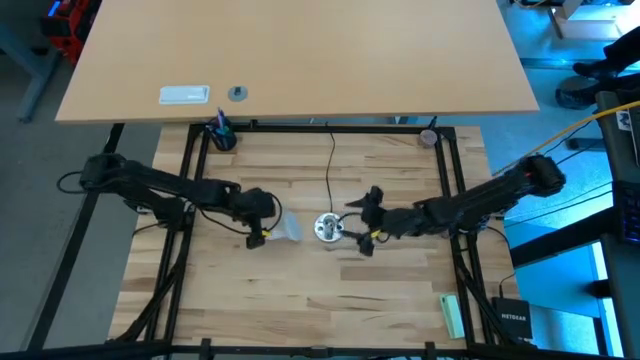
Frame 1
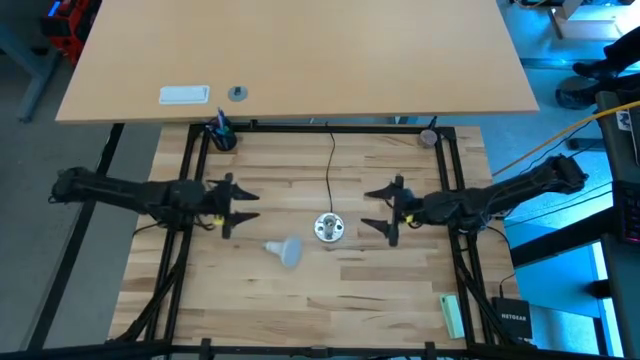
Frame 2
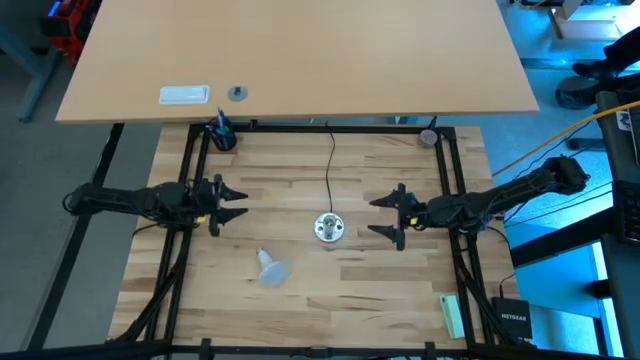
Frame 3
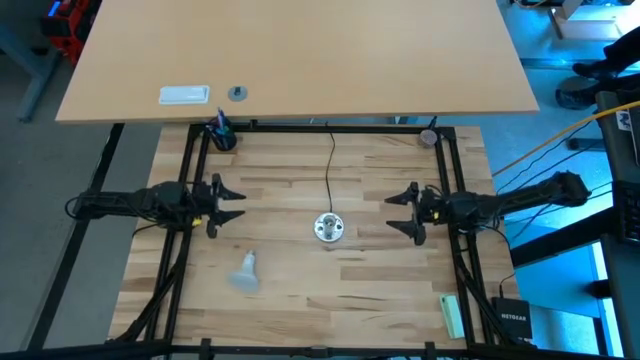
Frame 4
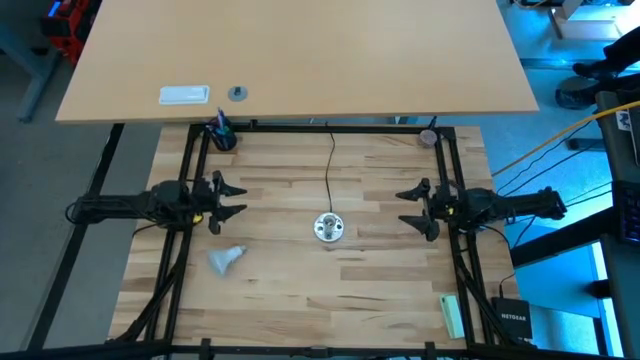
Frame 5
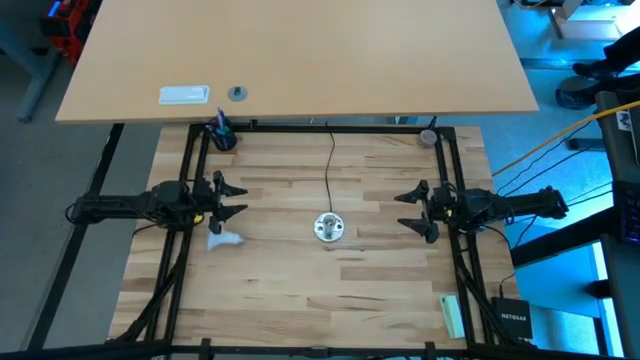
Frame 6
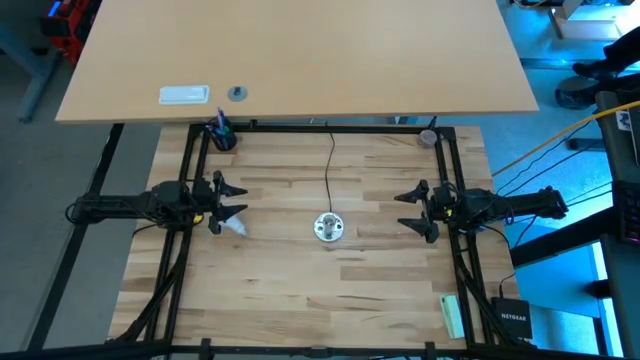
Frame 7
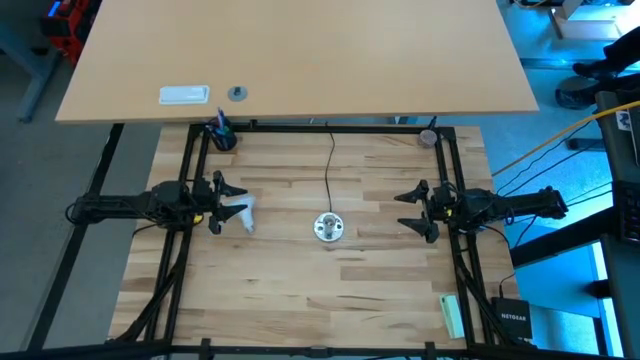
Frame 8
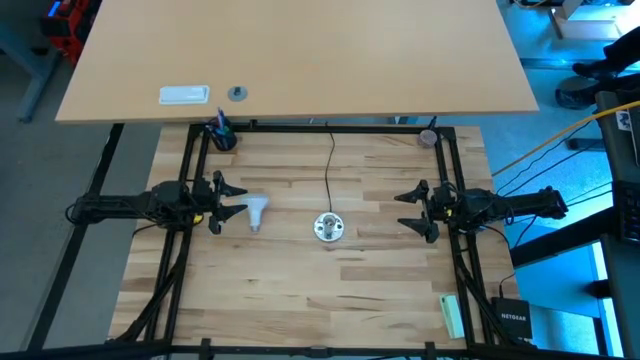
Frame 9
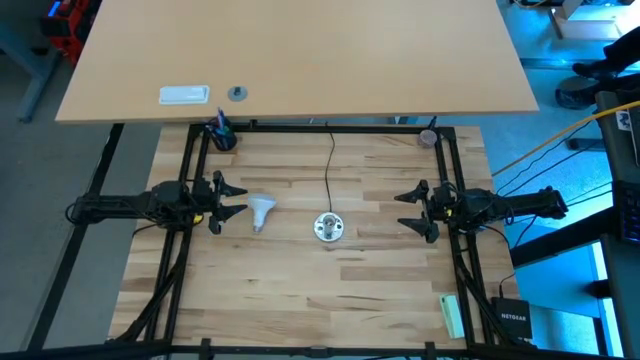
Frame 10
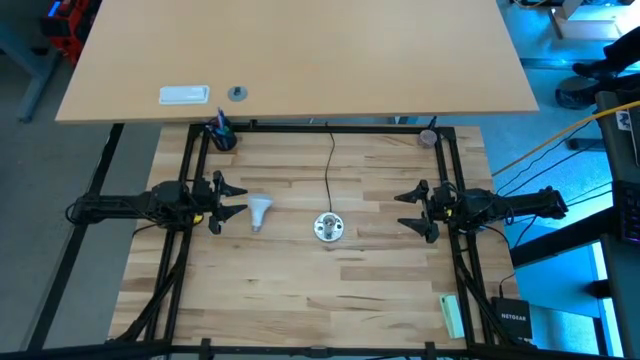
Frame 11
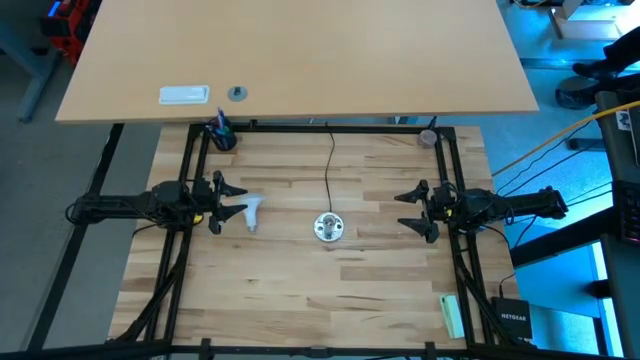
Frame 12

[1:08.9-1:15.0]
Task: Screw lightbulb
Return to Home Position

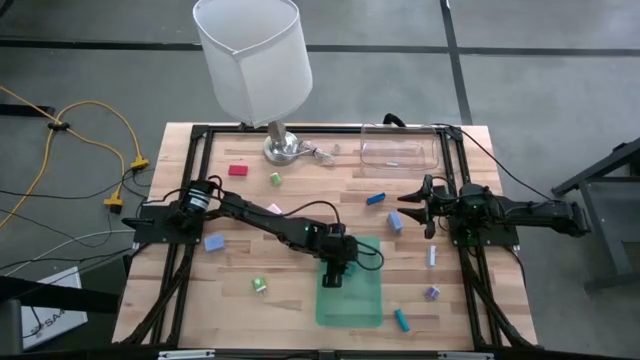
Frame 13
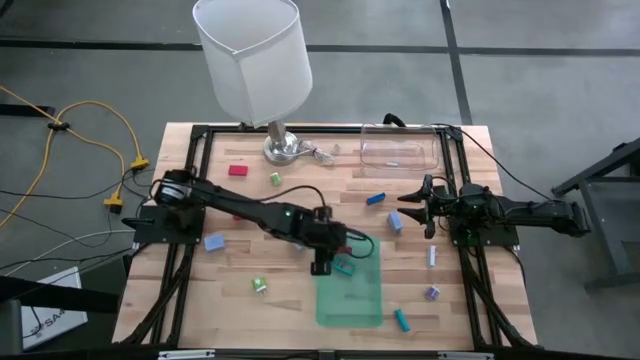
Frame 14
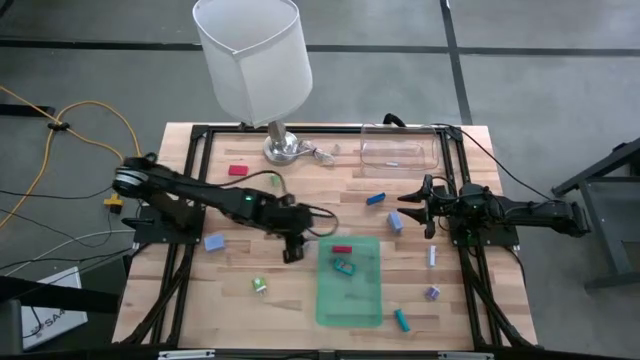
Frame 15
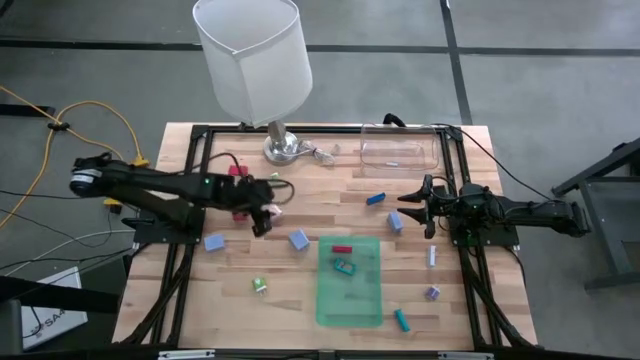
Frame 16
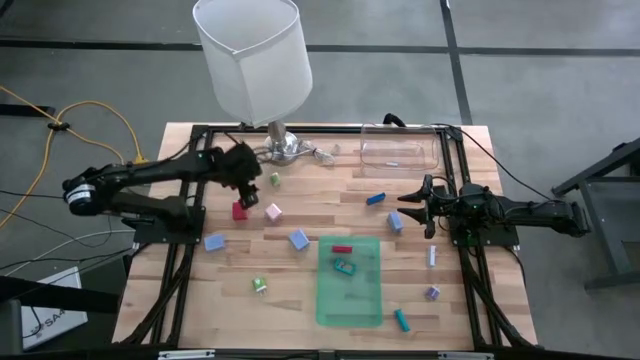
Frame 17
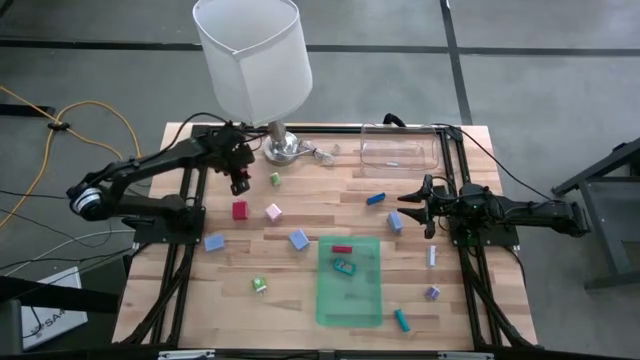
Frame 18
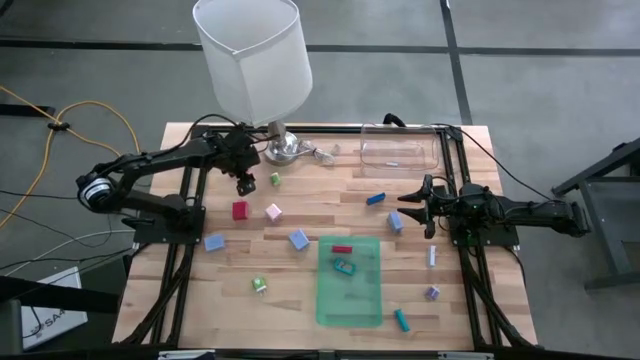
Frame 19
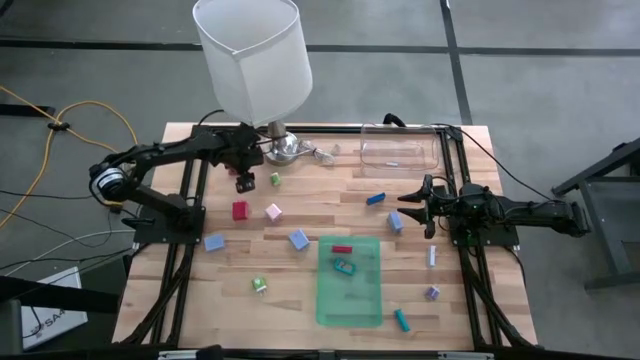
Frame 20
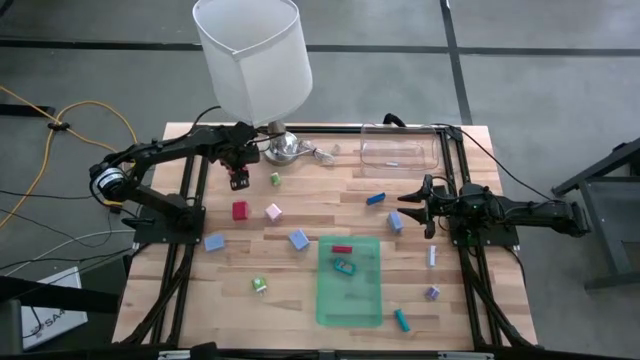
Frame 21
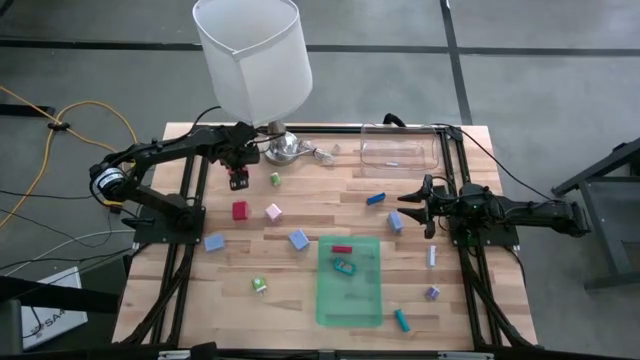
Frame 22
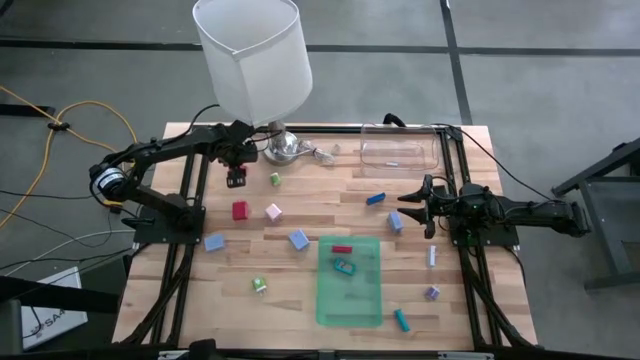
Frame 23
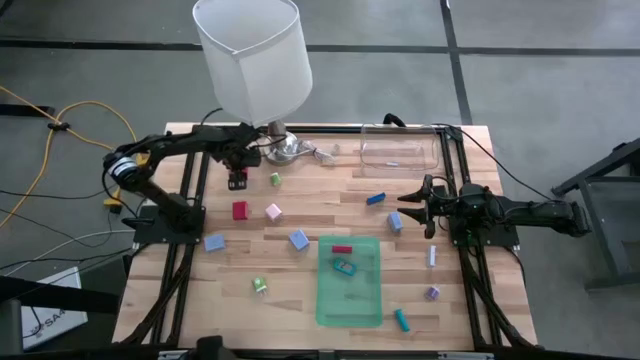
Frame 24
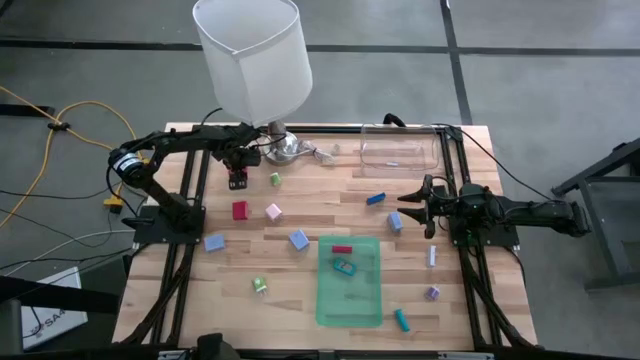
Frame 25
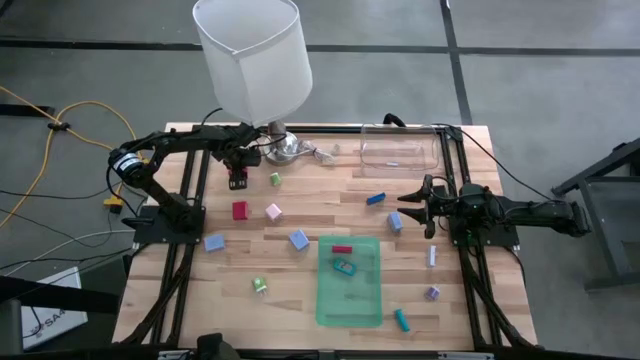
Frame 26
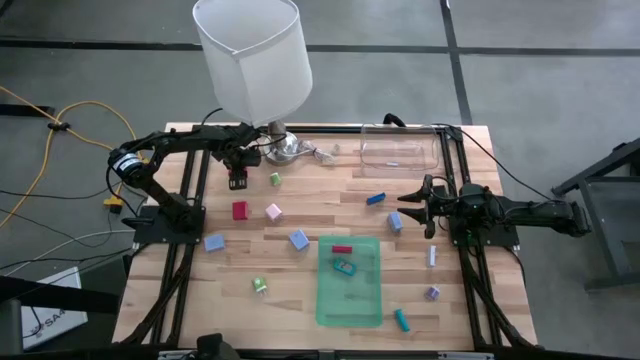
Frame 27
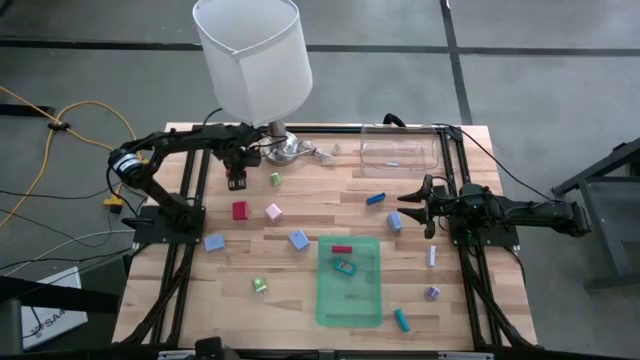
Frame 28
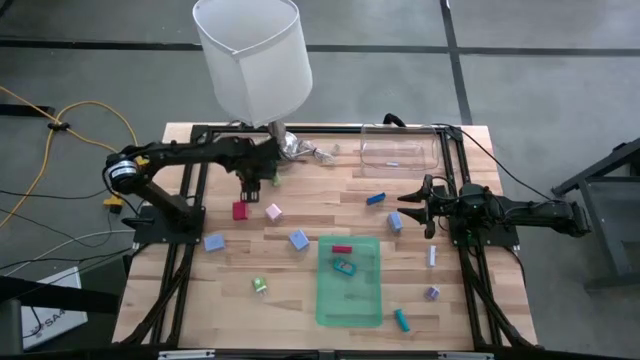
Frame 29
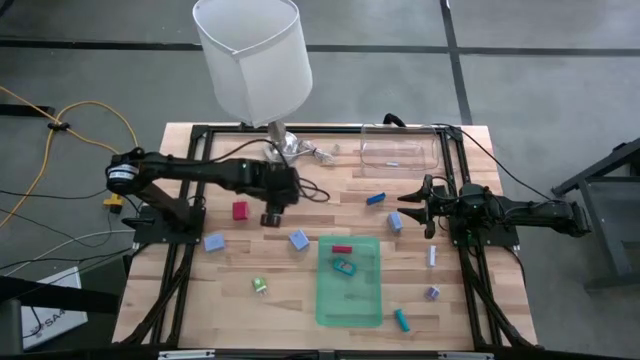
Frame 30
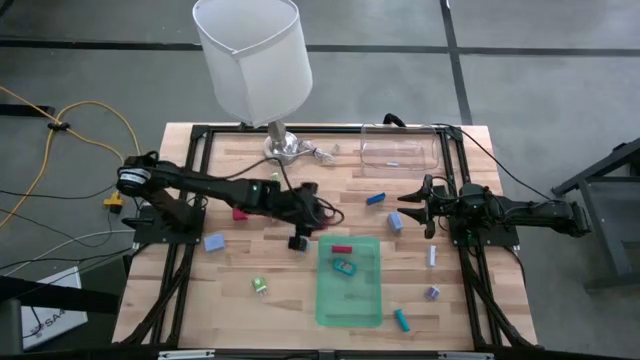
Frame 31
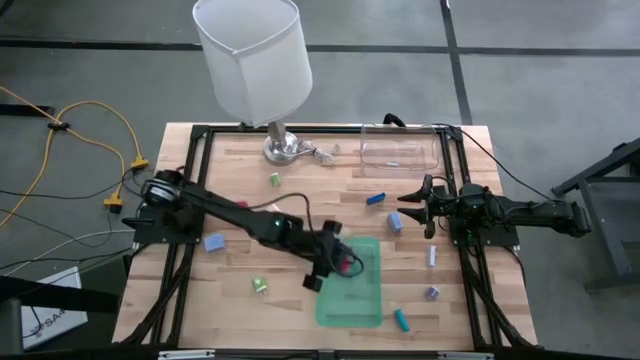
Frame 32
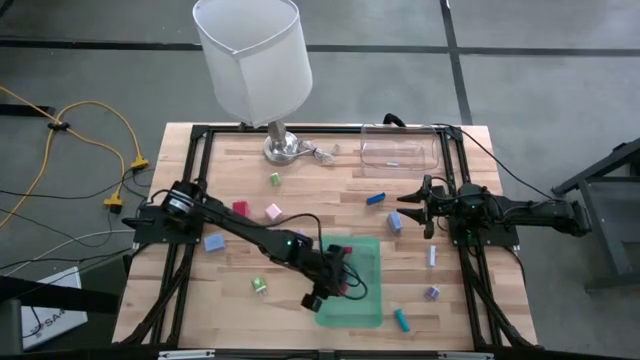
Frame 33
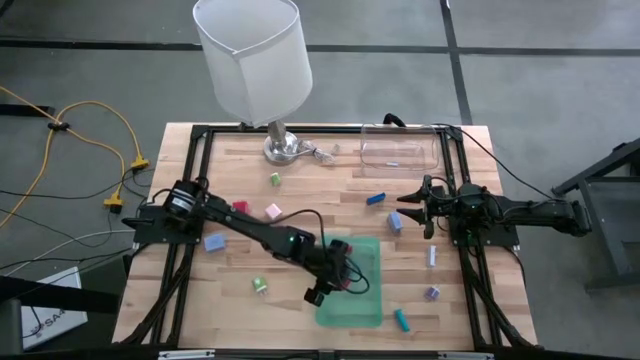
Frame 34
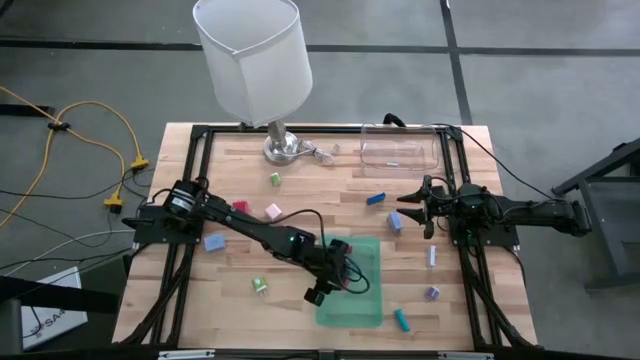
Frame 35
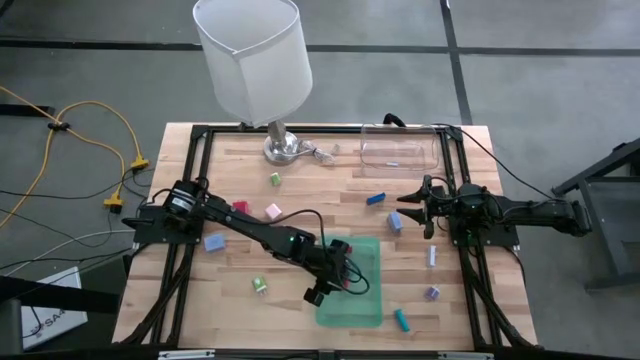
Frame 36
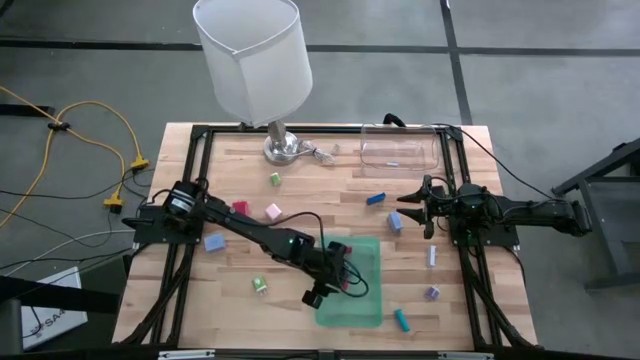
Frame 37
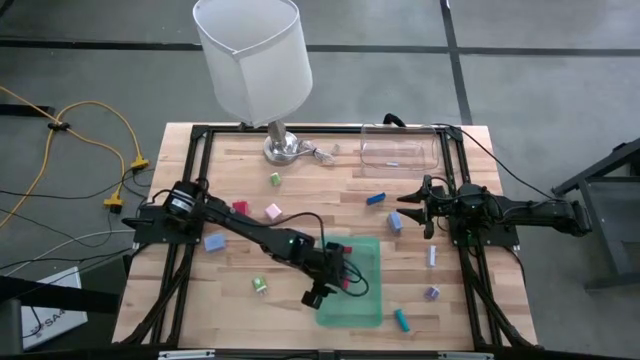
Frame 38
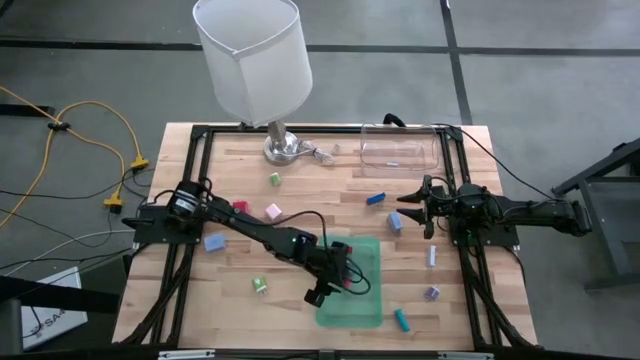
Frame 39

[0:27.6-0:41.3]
Task: Pick & Place Office items
Put the red digital clock into the green bin
